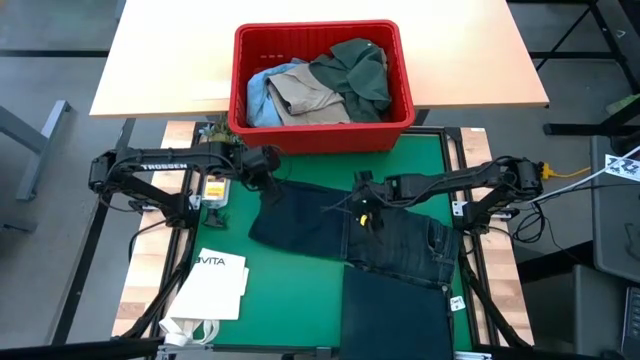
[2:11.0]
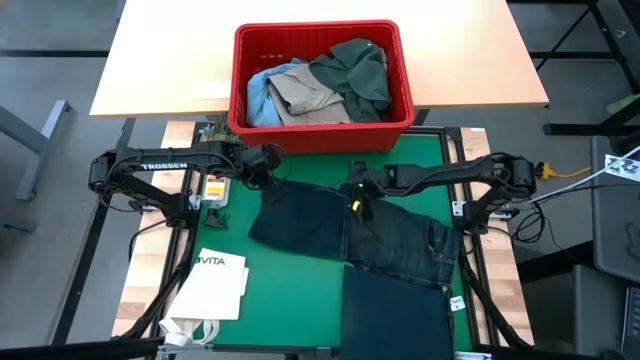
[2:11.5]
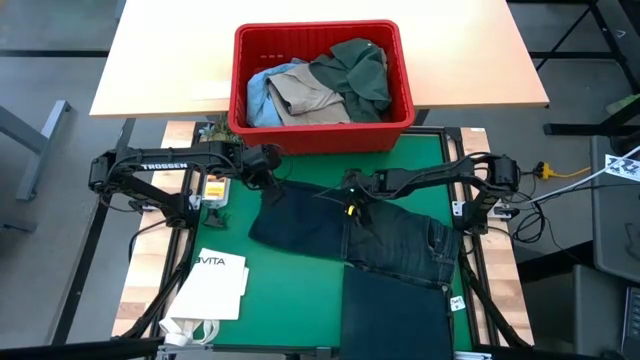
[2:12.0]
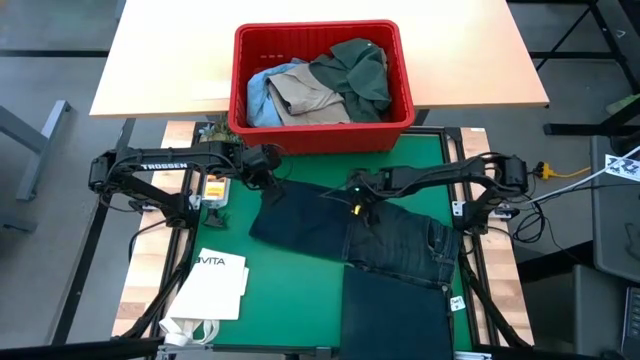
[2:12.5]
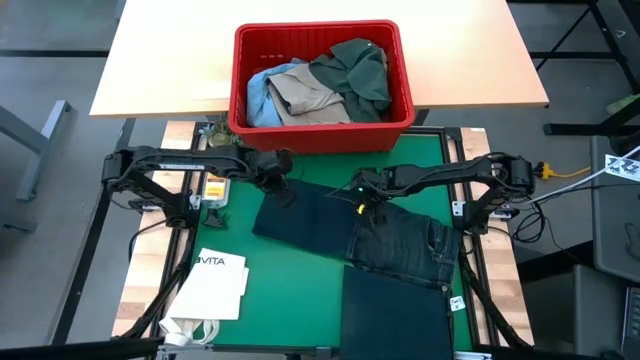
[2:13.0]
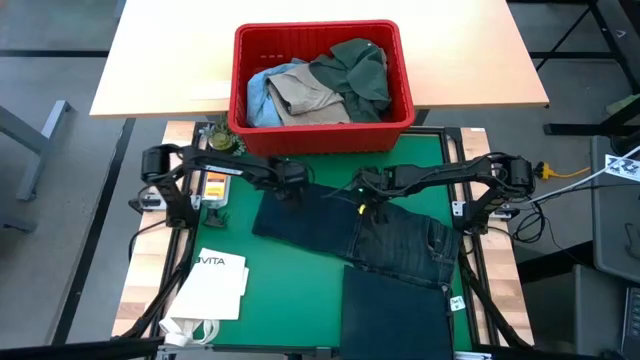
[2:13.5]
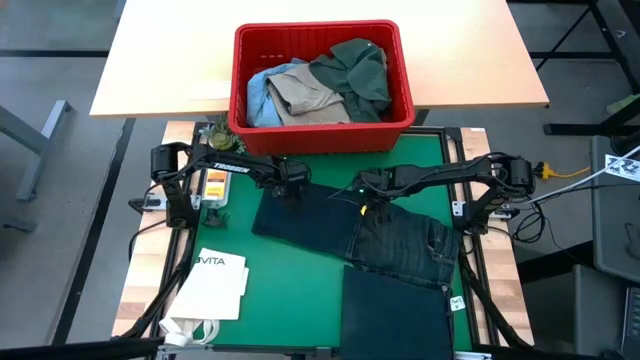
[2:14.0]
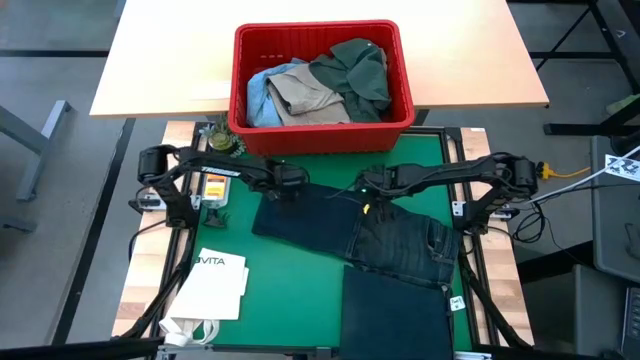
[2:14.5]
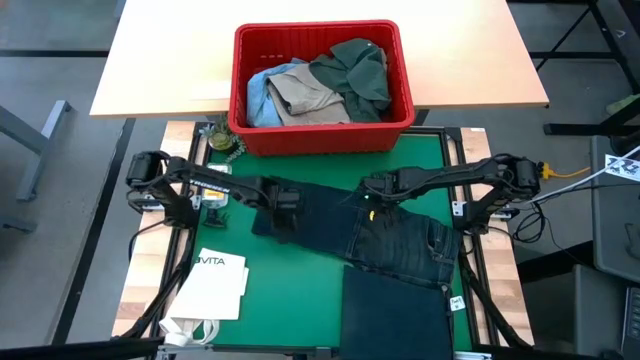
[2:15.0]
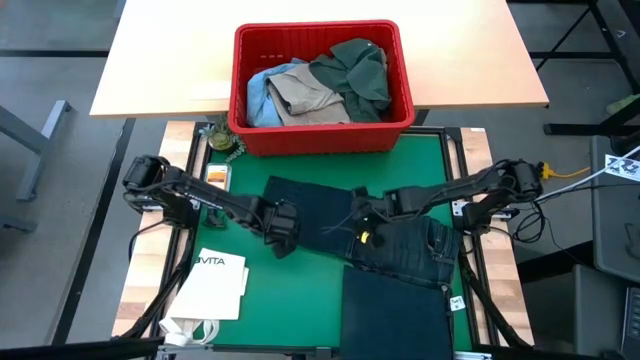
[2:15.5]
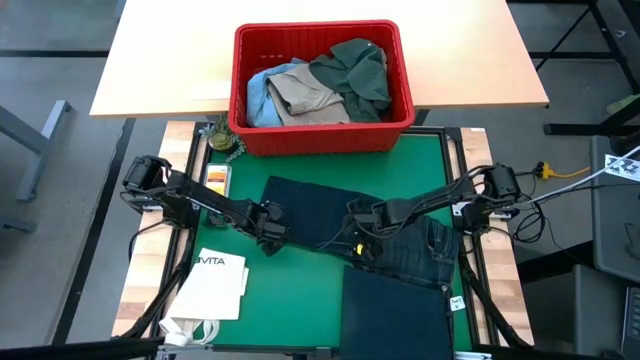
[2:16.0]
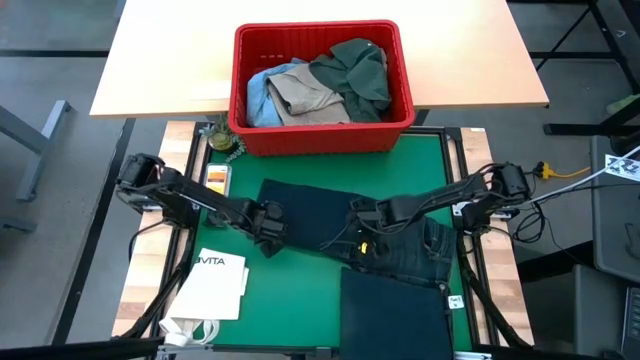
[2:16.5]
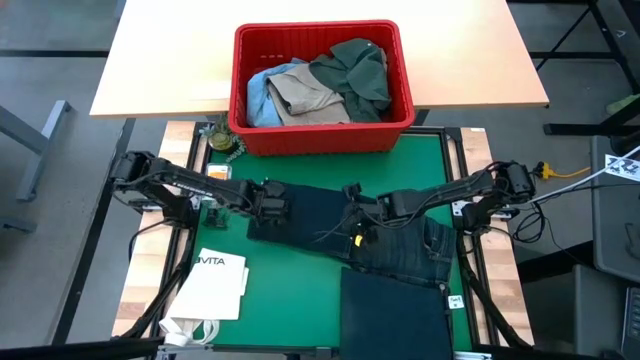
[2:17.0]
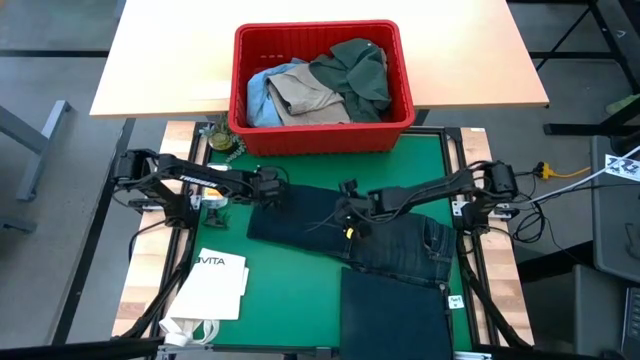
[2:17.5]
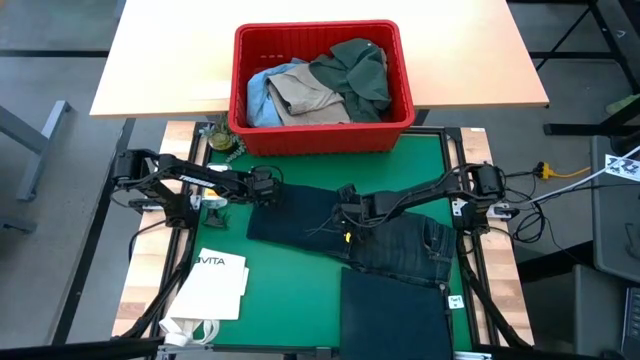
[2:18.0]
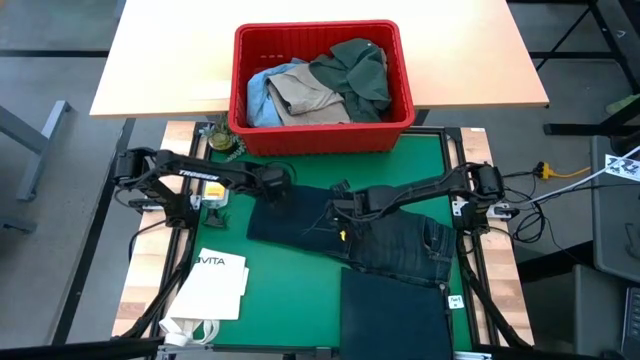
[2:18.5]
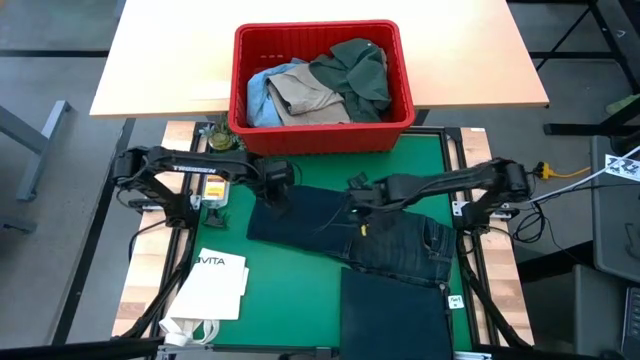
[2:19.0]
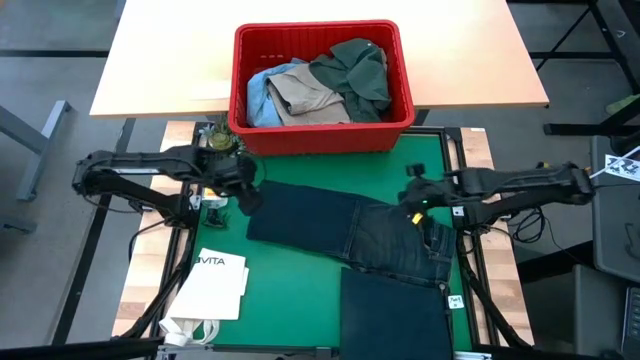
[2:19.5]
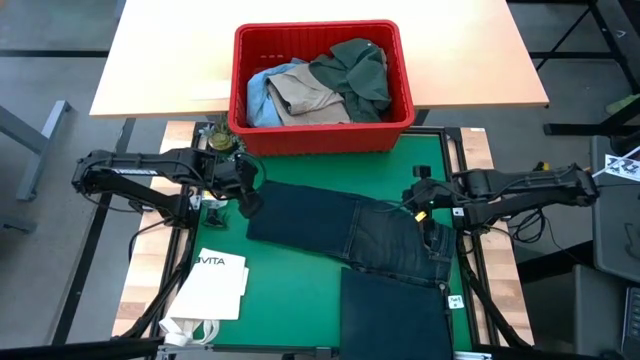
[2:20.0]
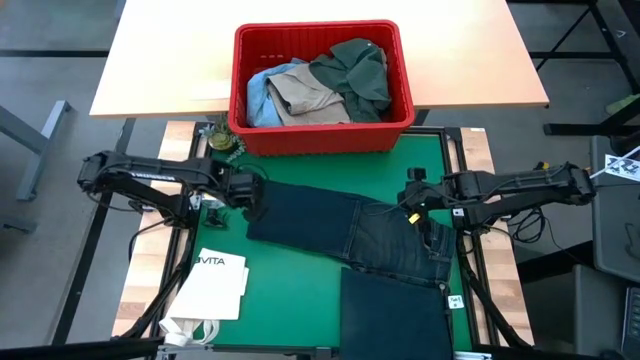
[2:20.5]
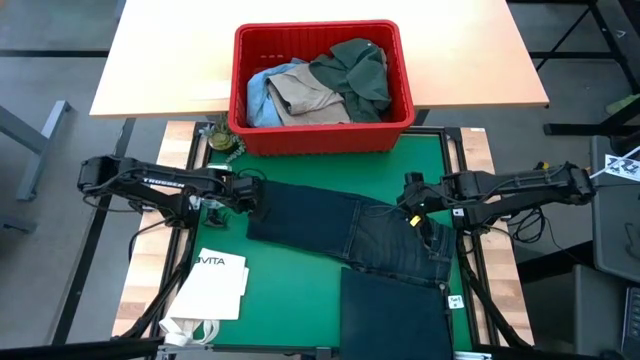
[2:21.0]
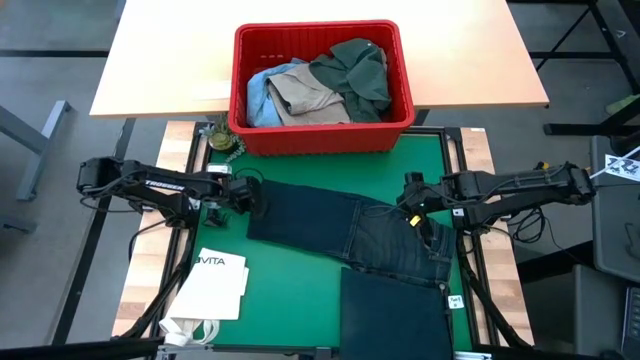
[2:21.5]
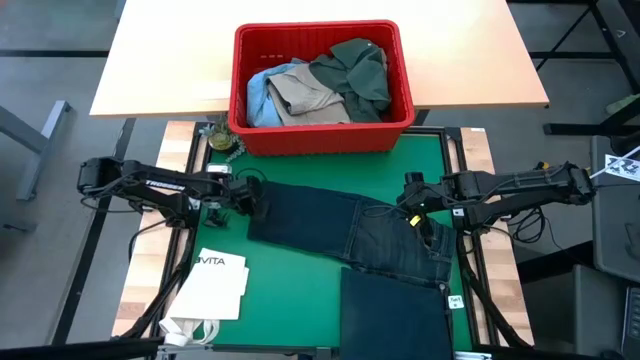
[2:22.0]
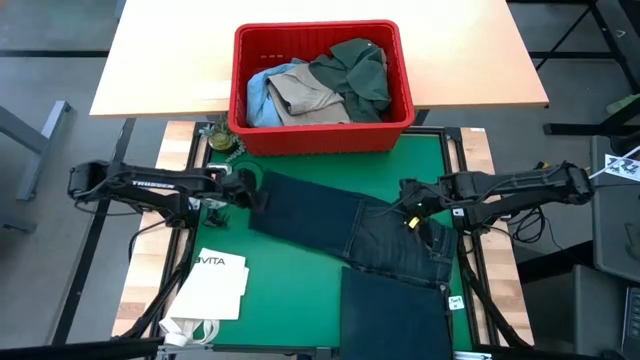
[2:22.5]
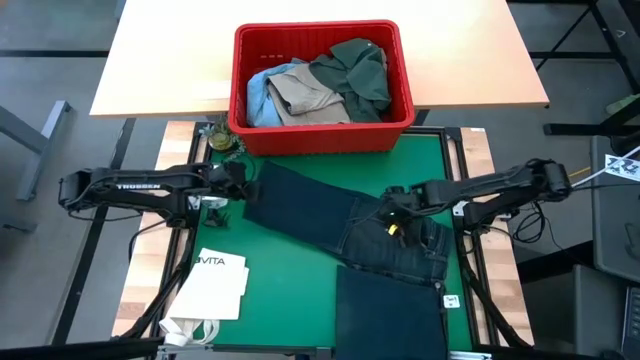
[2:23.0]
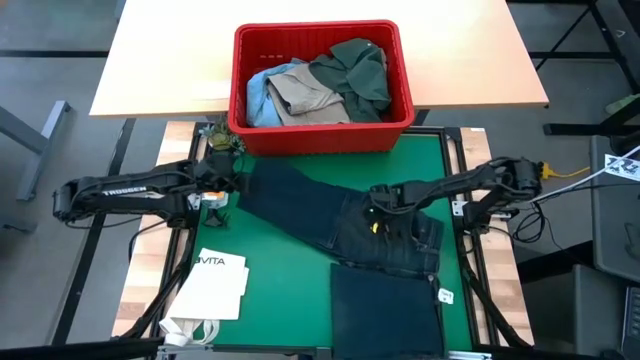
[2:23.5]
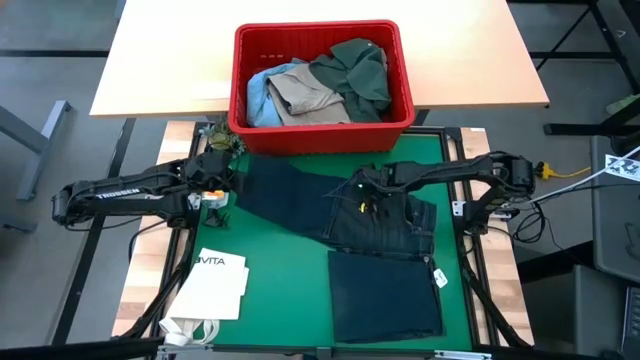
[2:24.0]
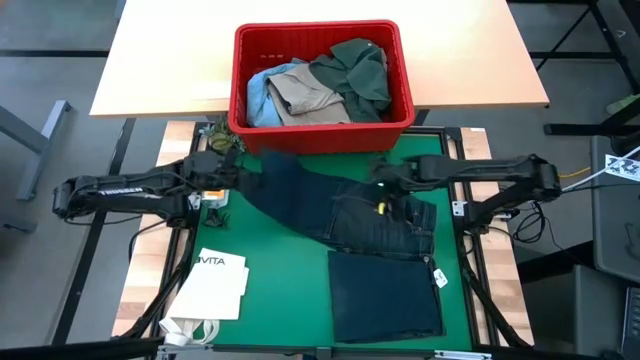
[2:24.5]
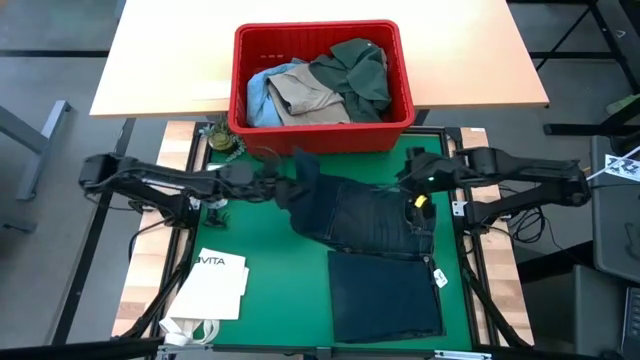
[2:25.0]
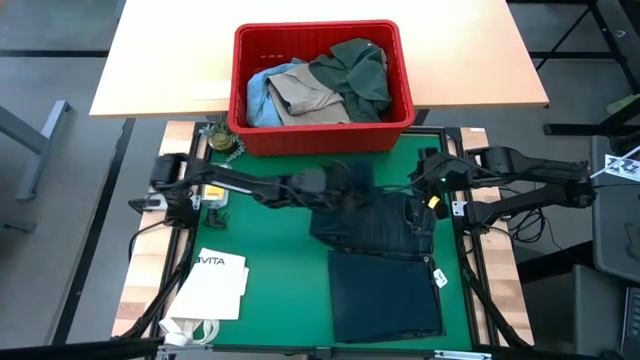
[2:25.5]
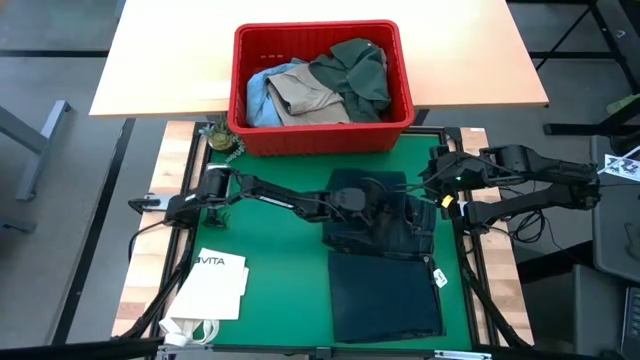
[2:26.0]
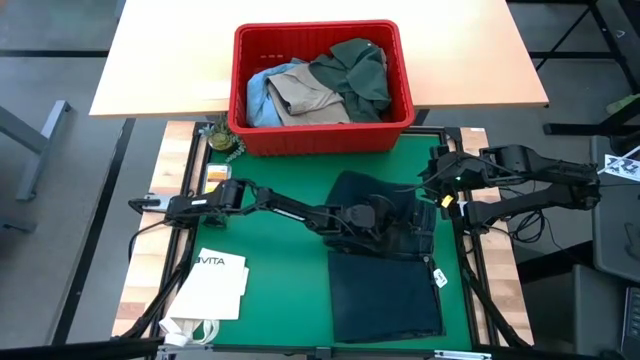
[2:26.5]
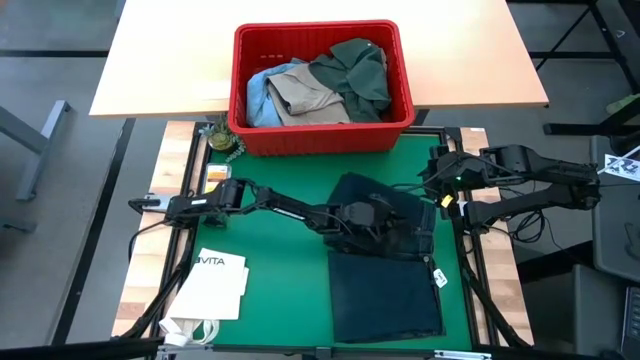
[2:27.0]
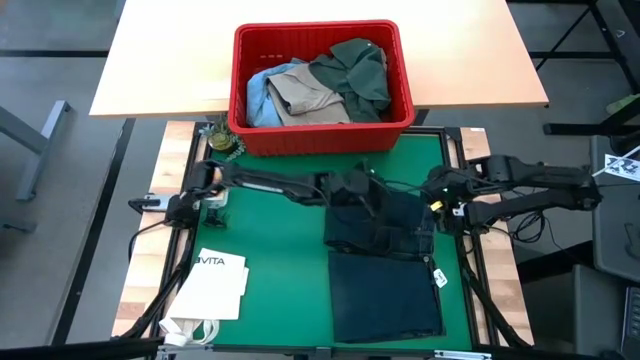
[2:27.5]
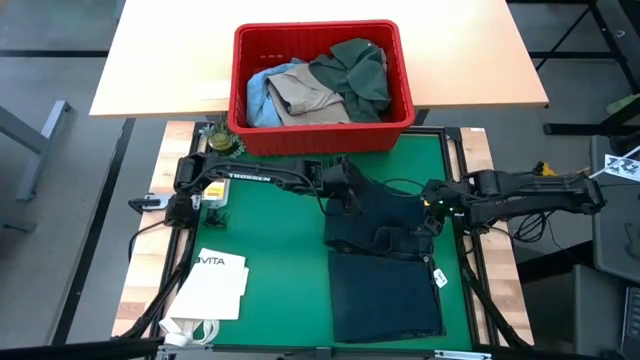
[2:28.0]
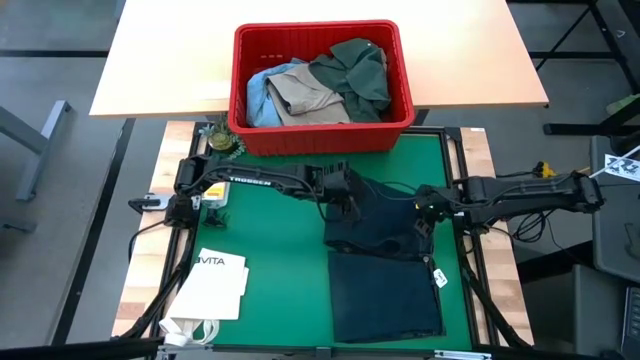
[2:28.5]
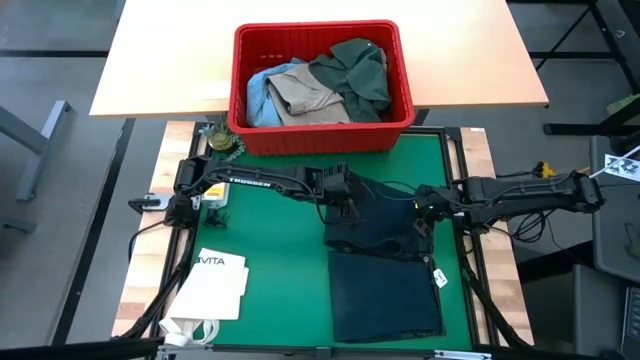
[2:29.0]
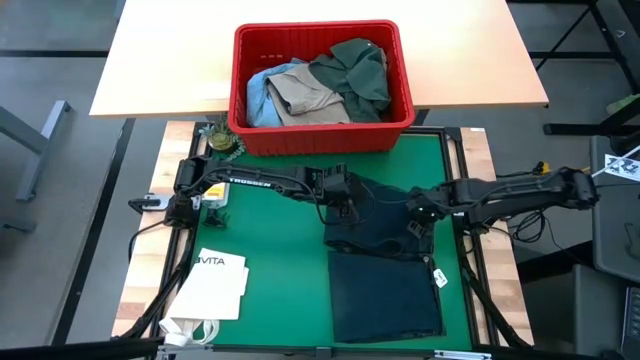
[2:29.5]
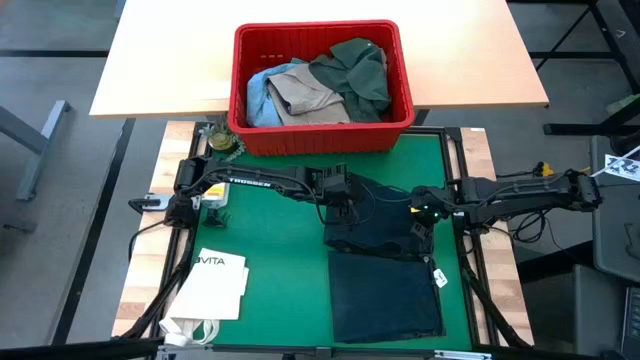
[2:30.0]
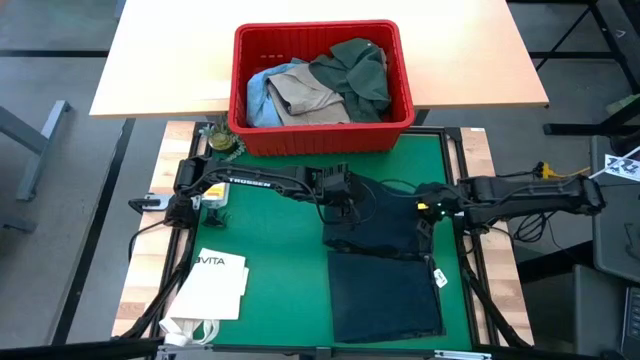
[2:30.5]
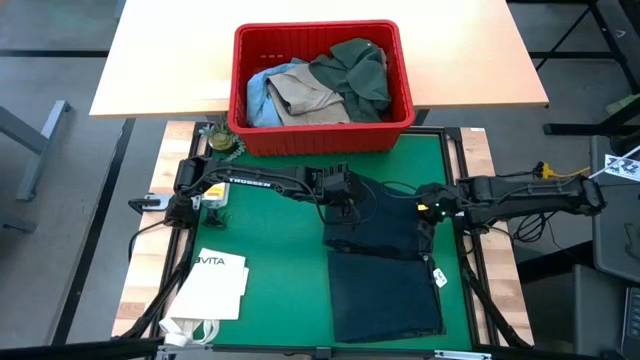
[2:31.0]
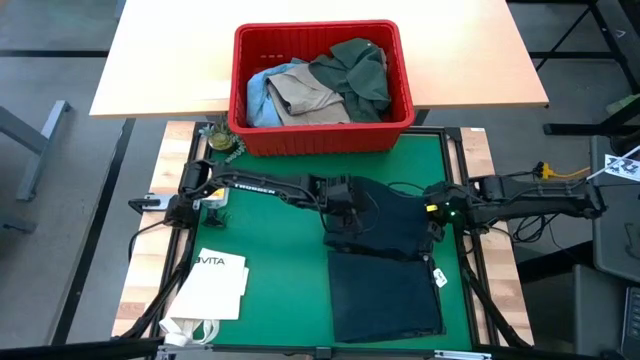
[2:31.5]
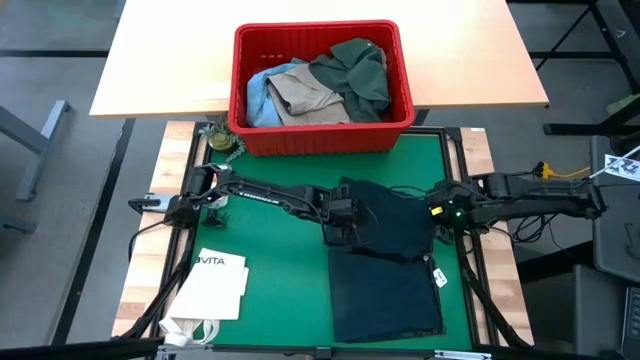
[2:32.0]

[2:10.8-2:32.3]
Task: Fold Laundry from Bin
Fold the dark blue pants
